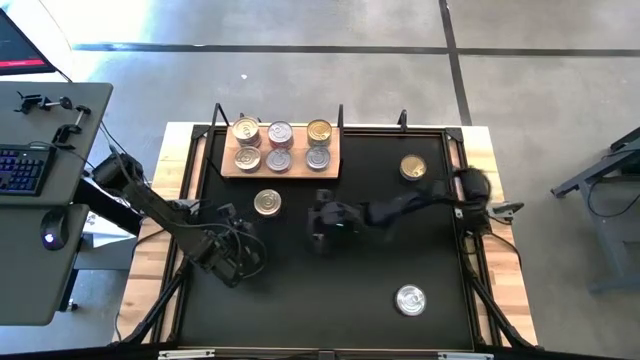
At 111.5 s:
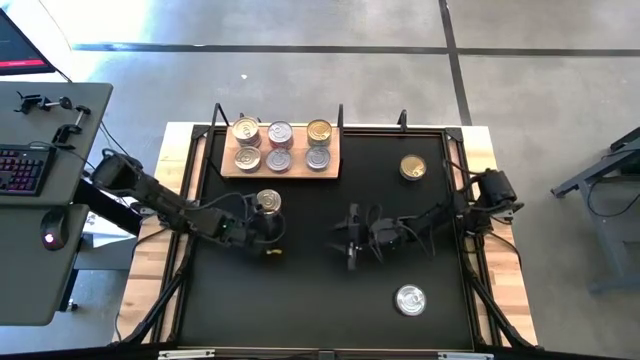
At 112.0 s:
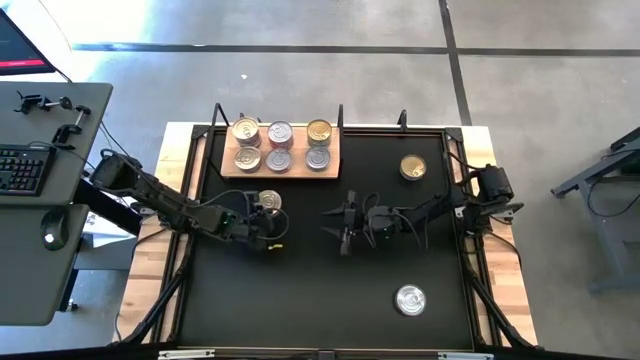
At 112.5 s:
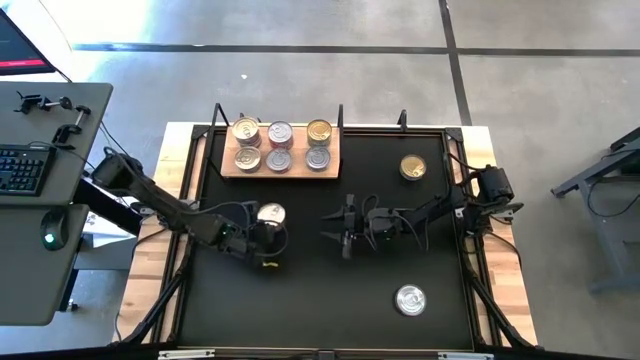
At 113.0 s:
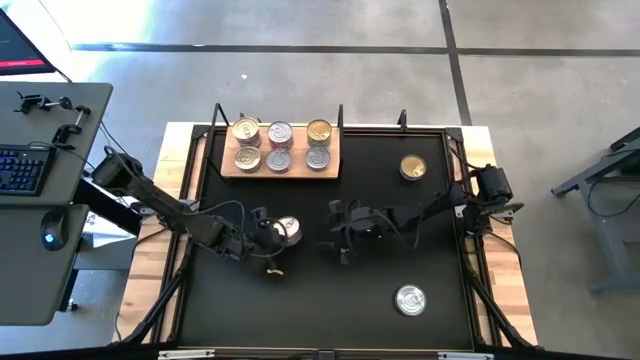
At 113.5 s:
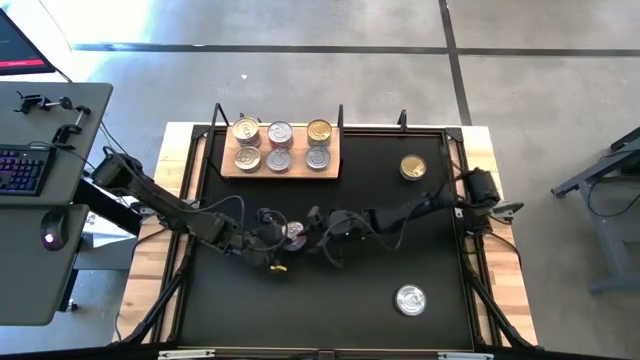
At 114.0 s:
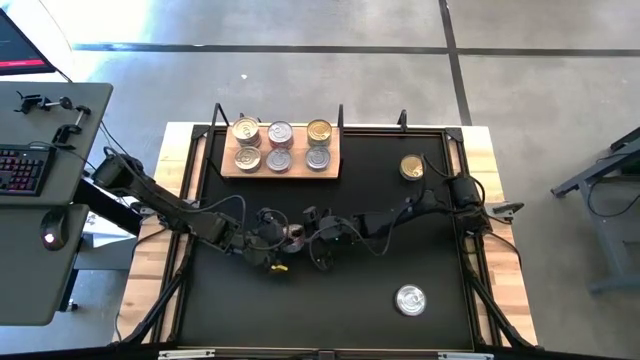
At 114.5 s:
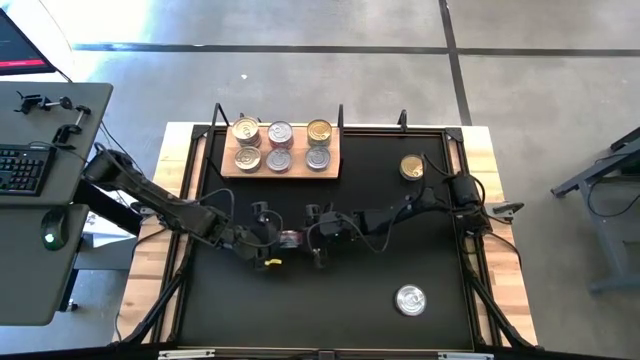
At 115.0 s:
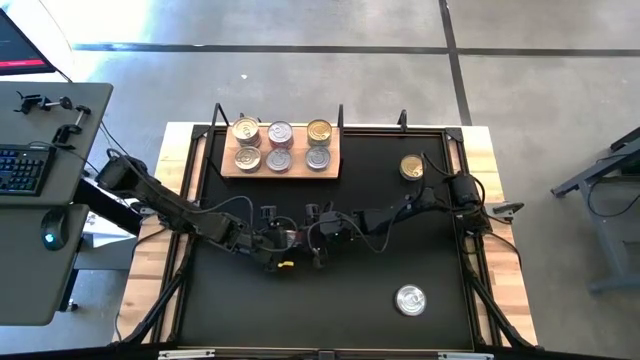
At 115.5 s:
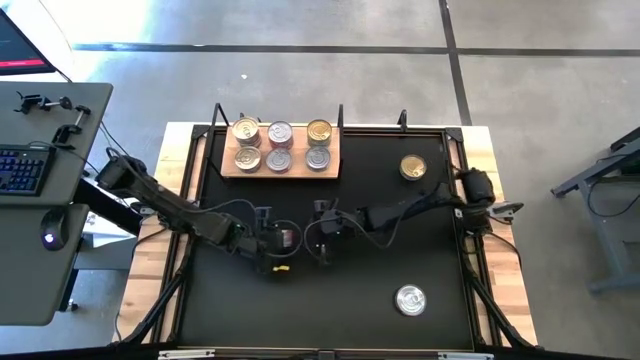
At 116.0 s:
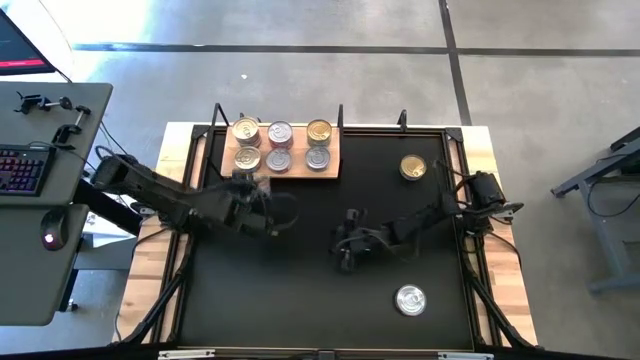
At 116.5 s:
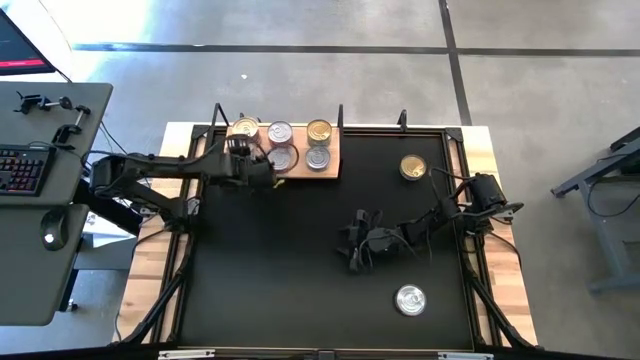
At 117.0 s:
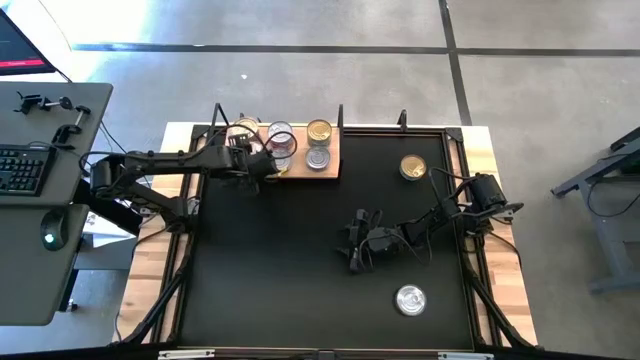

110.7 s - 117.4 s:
Task: Stack canned seafood by type on shelf
Stack the blue tuna can on top of the blue tuna can on the shelf

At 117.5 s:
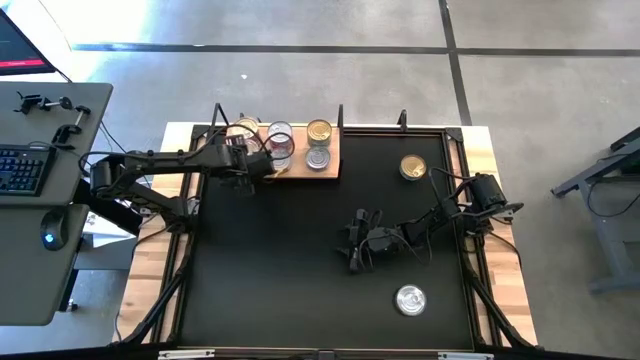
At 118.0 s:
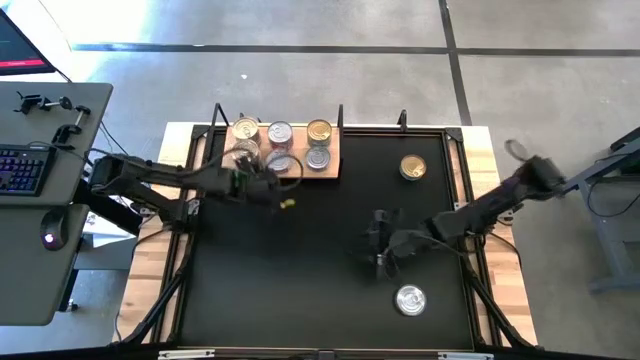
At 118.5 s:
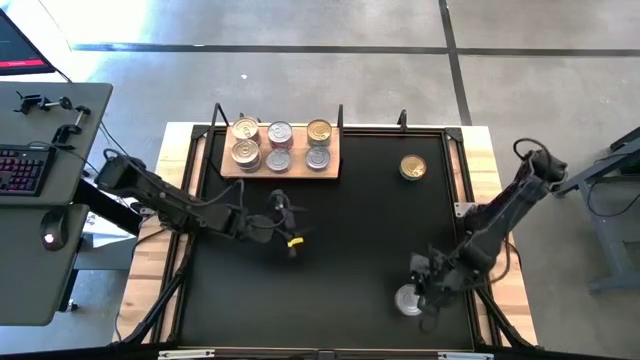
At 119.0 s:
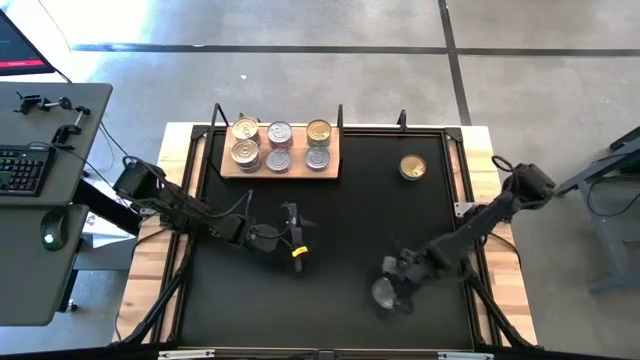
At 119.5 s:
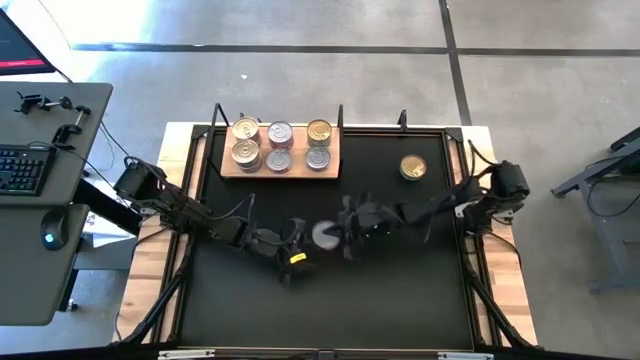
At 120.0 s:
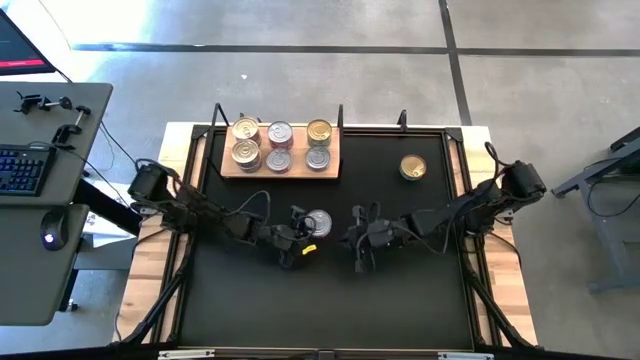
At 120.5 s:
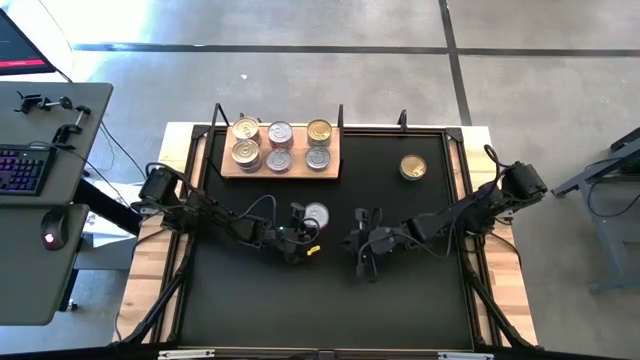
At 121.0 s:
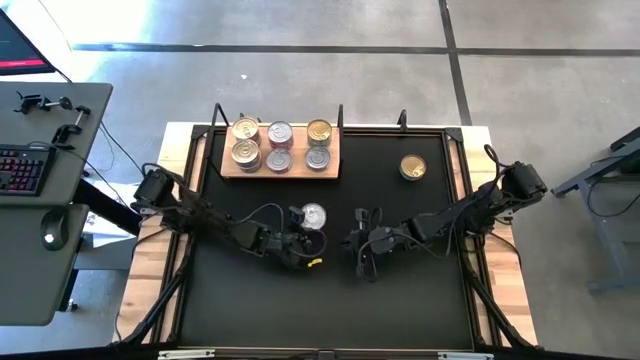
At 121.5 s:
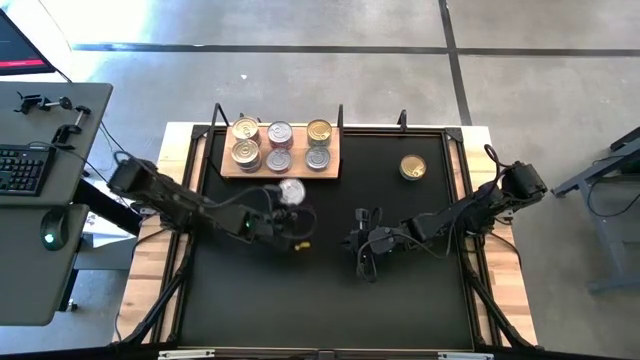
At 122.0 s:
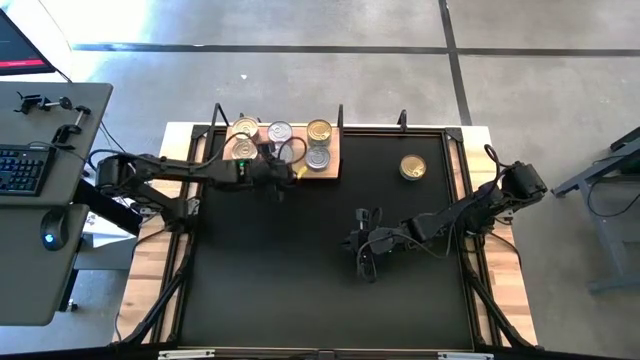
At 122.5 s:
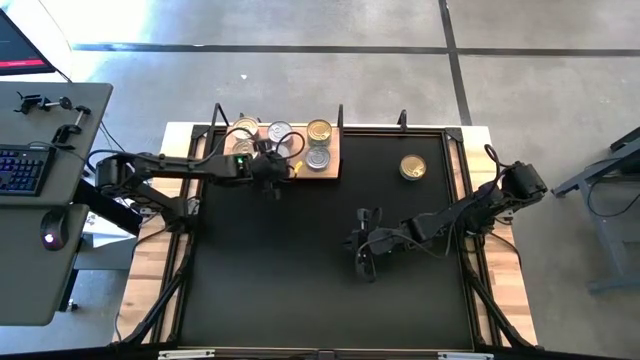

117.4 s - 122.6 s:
Stack the red tuna can on top of the red tuna can on the shelf

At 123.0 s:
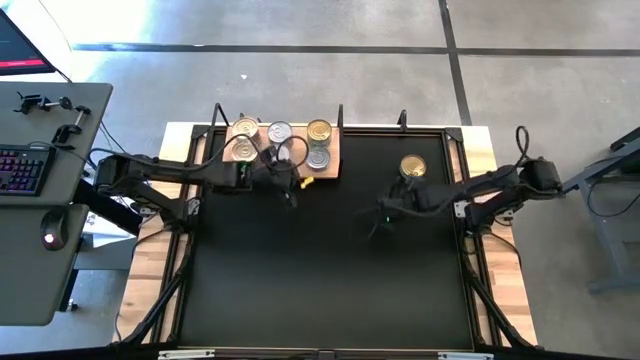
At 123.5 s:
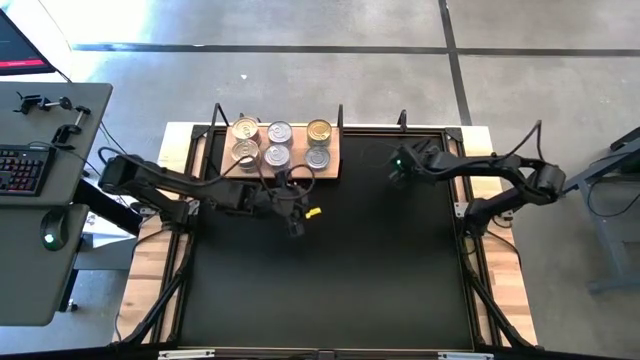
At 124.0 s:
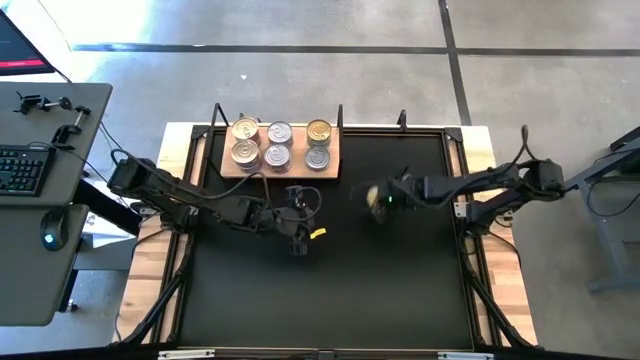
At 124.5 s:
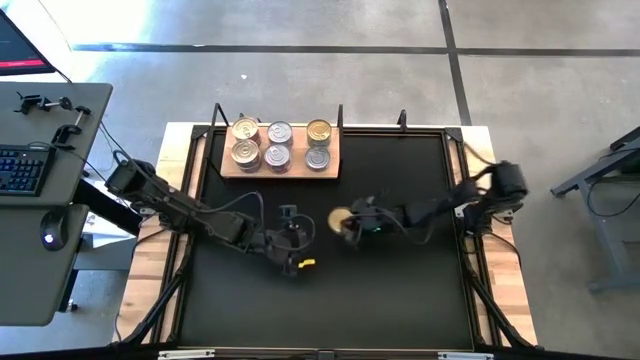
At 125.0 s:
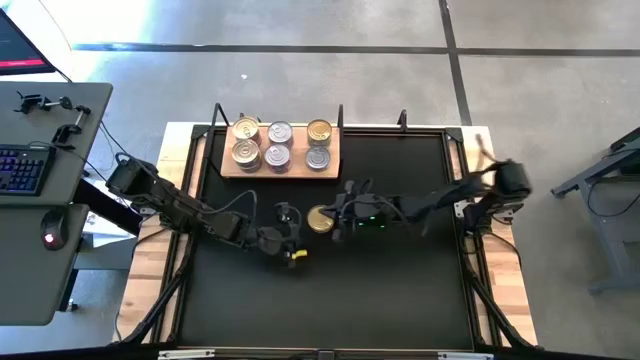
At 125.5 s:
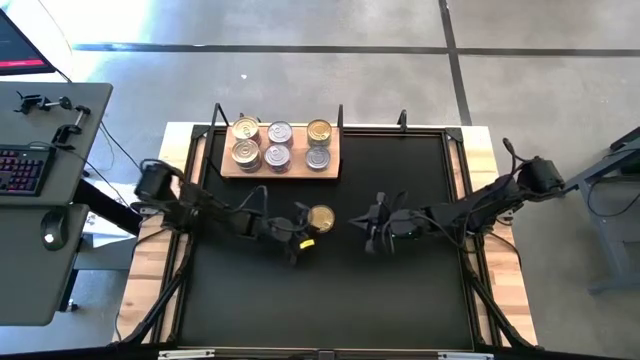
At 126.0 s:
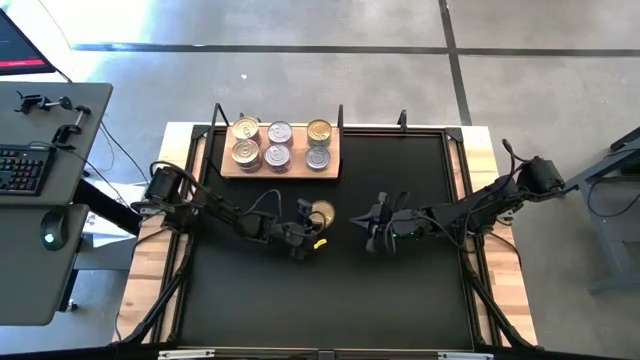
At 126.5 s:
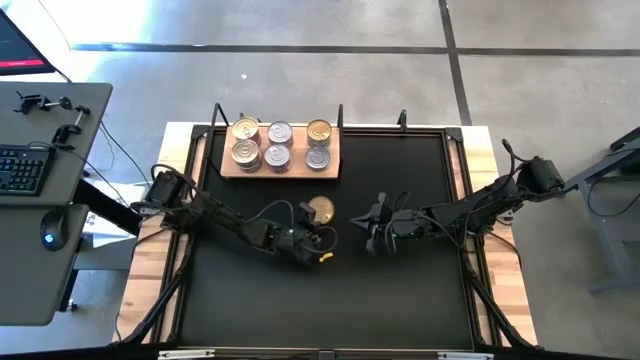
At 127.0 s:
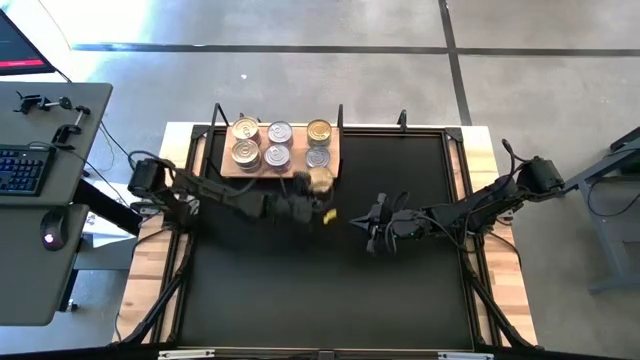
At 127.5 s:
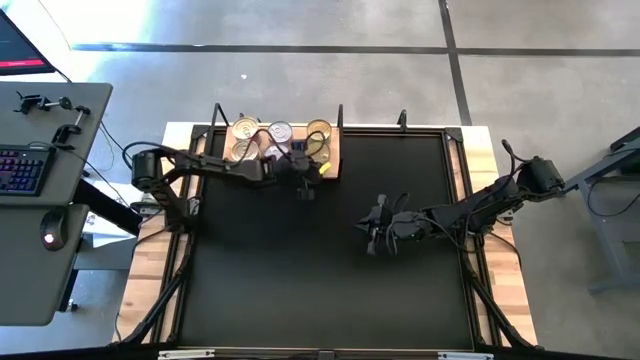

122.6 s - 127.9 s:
Stack the green tuna can on top of the green tuna can on the shelf

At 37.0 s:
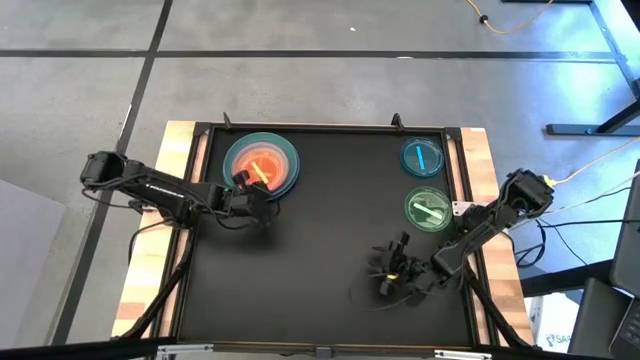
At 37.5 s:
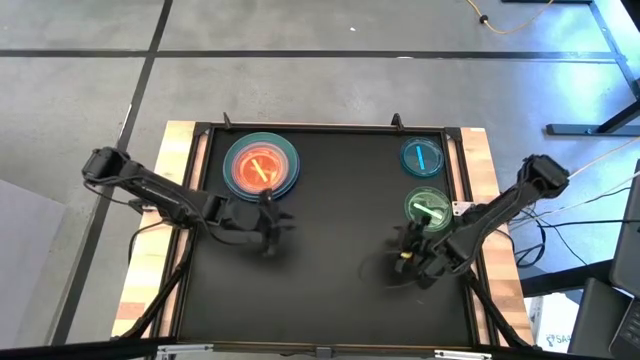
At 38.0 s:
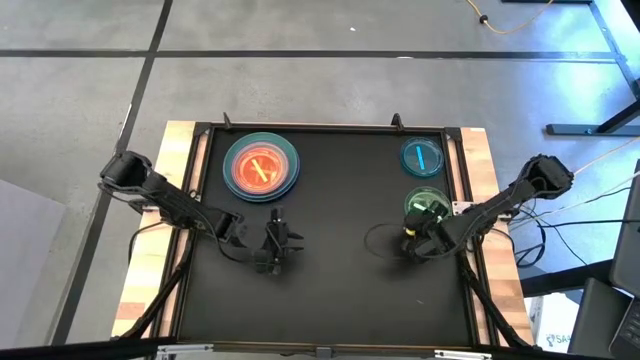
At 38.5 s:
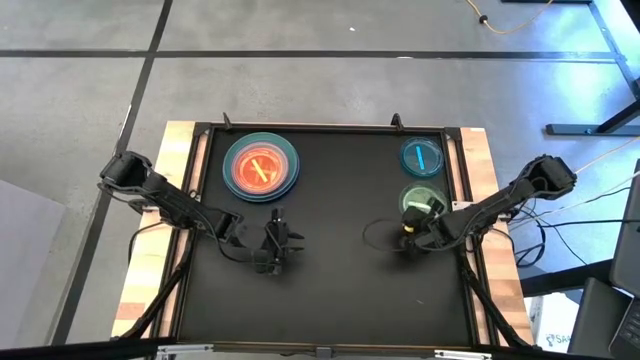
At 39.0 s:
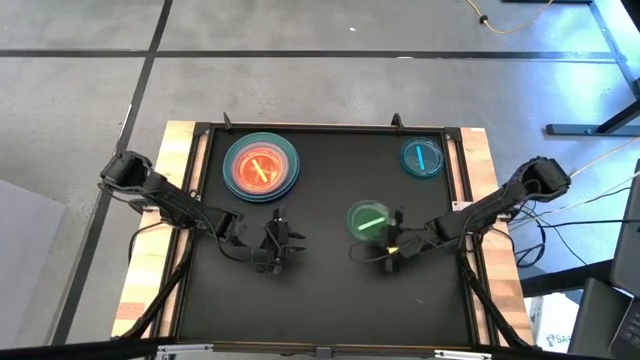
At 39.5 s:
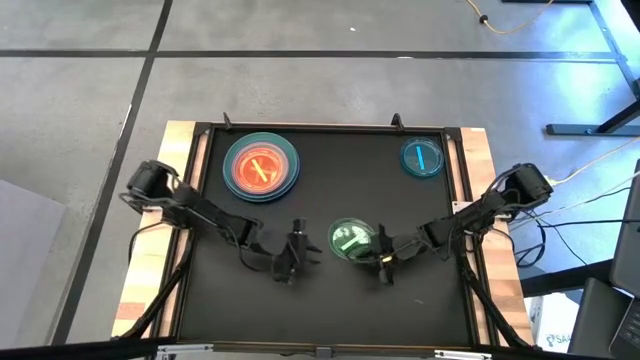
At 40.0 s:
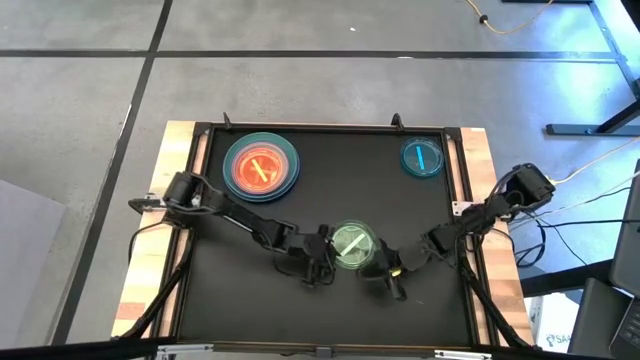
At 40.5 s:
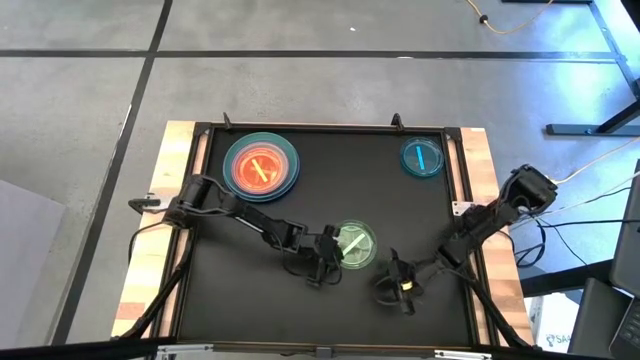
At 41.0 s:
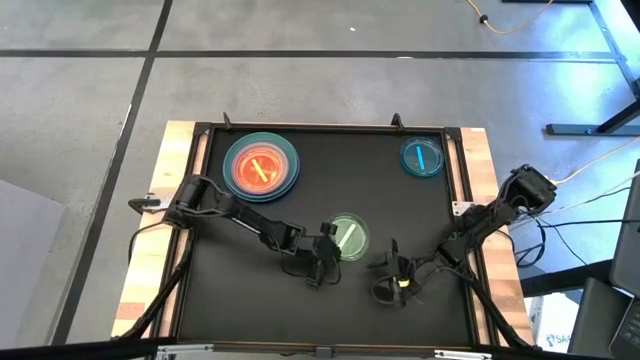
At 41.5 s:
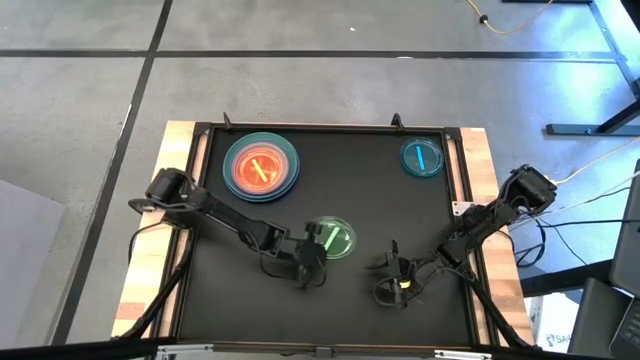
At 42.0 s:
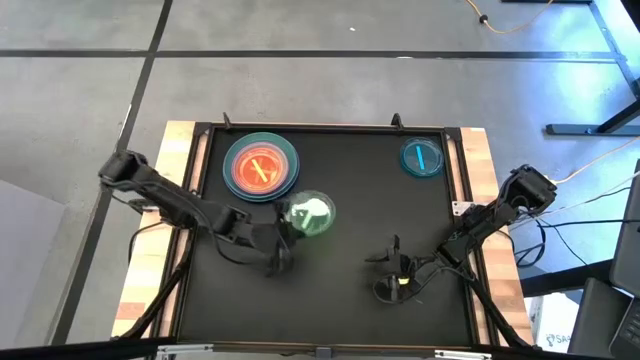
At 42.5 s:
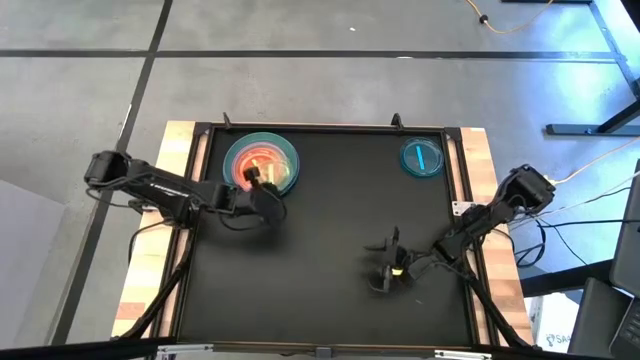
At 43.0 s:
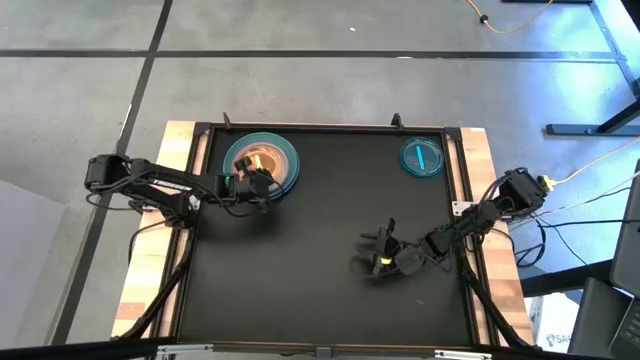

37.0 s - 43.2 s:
Task: Stack plastic plates
Stack the green transparent plate on top of the orange transparent plate
